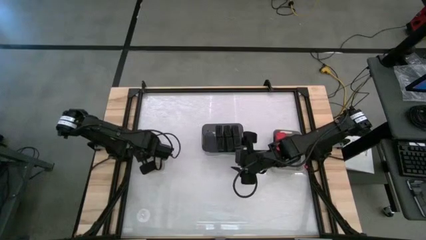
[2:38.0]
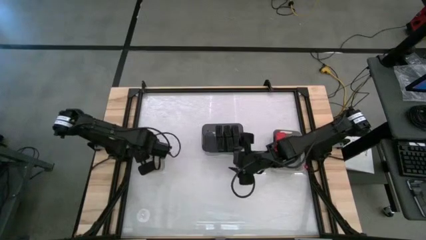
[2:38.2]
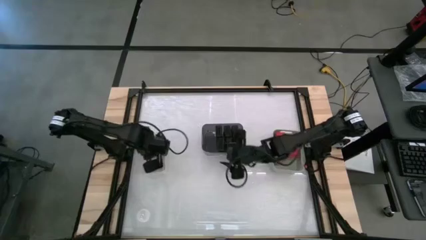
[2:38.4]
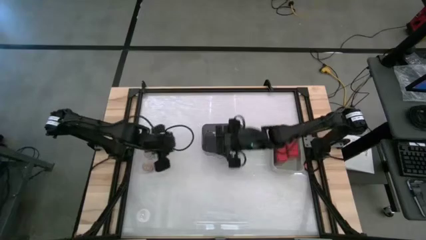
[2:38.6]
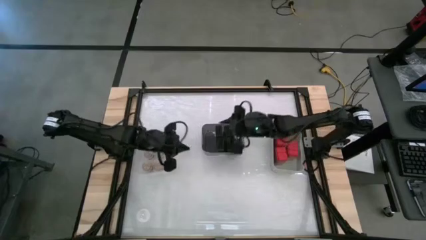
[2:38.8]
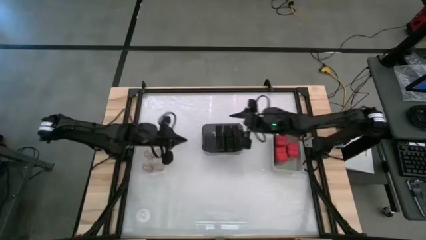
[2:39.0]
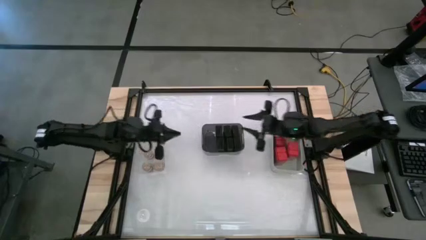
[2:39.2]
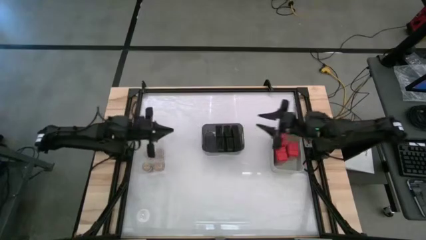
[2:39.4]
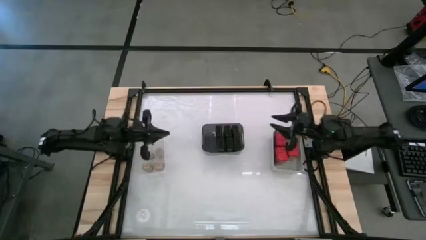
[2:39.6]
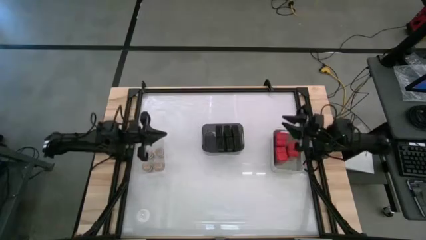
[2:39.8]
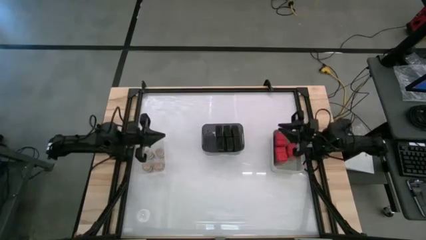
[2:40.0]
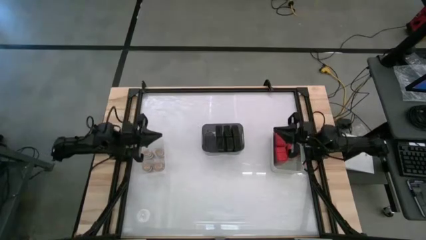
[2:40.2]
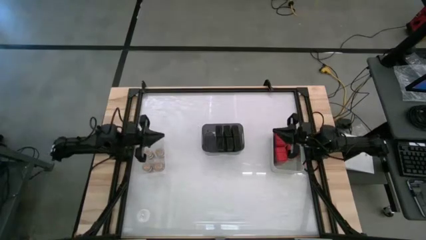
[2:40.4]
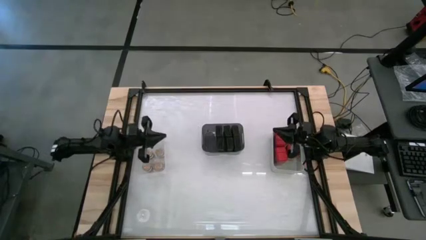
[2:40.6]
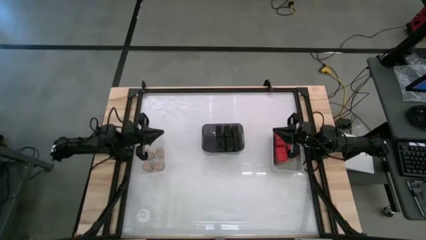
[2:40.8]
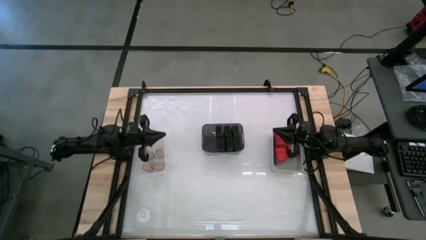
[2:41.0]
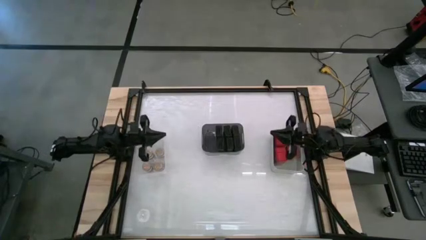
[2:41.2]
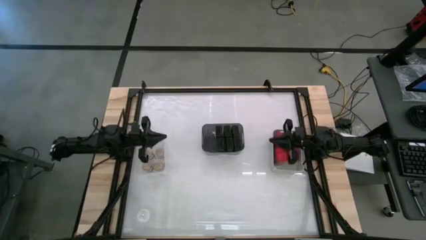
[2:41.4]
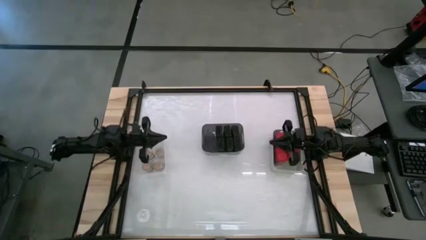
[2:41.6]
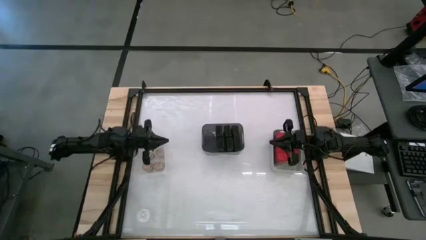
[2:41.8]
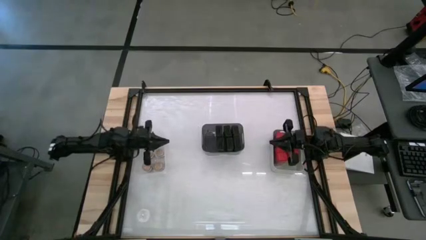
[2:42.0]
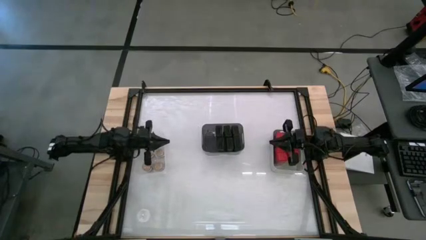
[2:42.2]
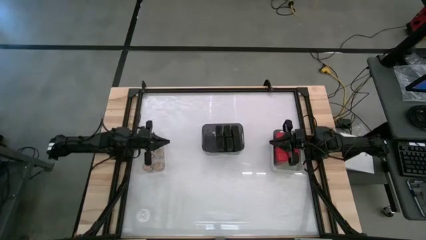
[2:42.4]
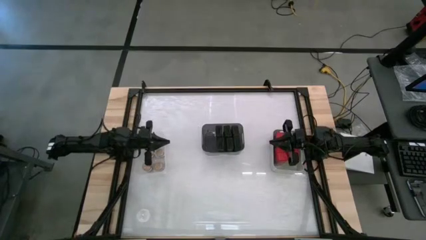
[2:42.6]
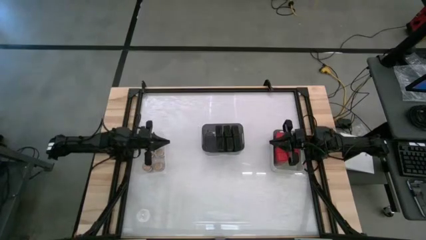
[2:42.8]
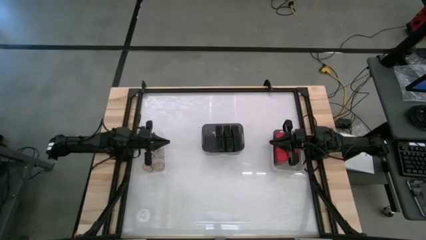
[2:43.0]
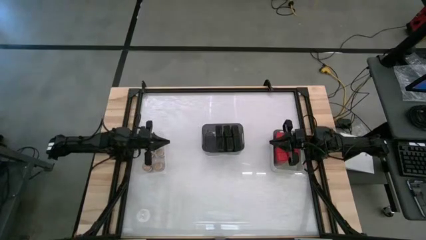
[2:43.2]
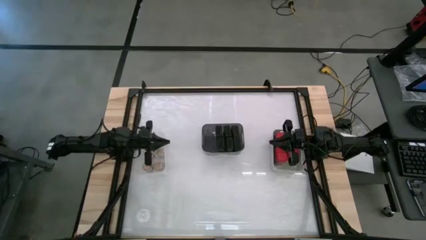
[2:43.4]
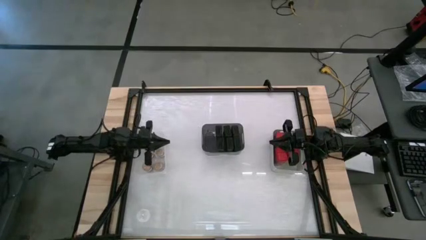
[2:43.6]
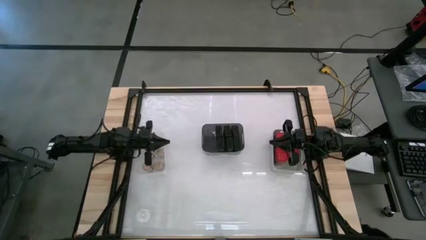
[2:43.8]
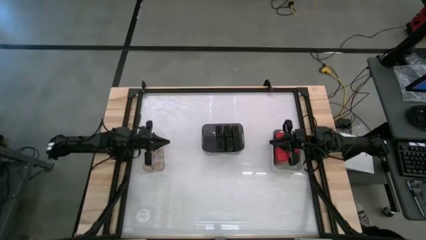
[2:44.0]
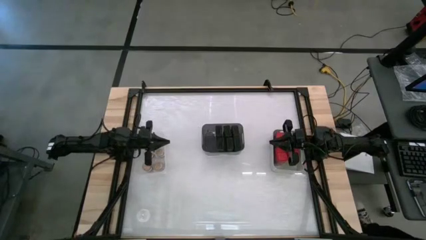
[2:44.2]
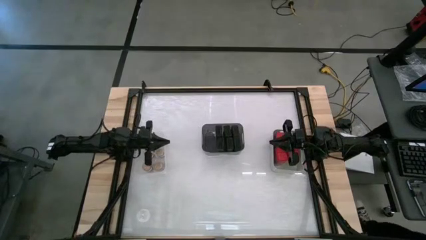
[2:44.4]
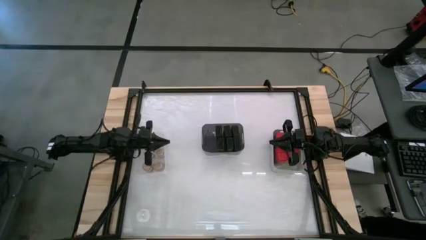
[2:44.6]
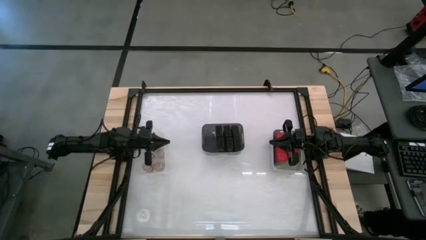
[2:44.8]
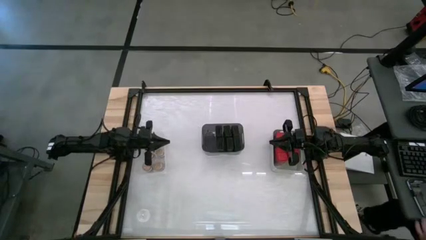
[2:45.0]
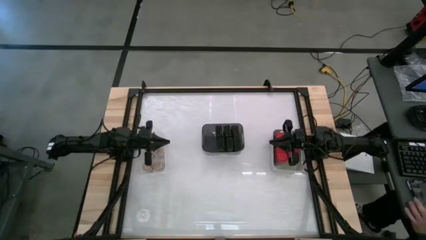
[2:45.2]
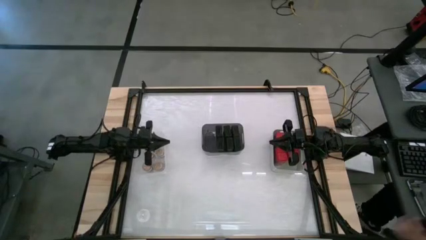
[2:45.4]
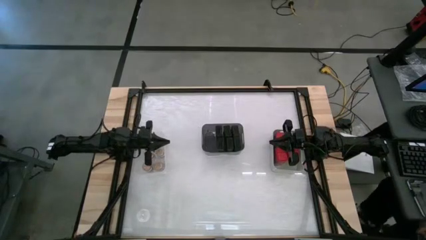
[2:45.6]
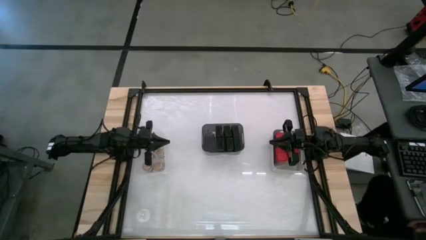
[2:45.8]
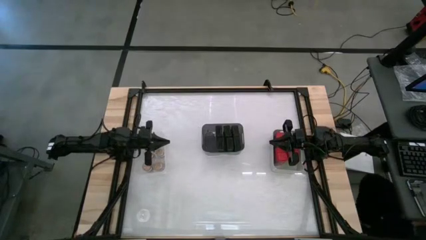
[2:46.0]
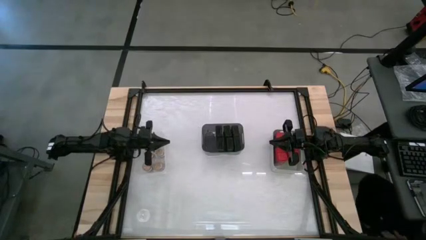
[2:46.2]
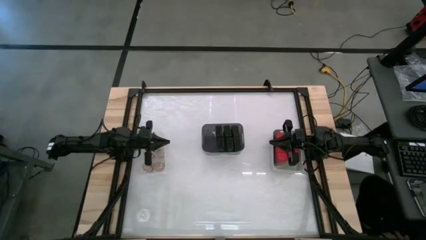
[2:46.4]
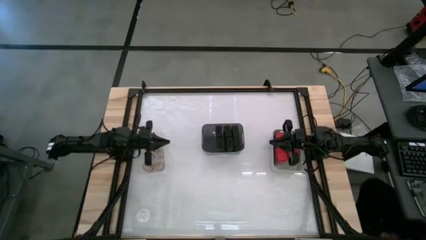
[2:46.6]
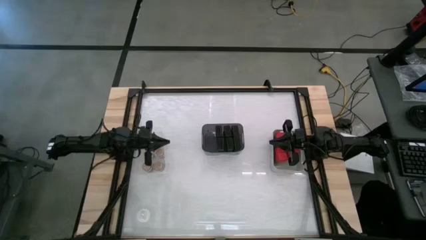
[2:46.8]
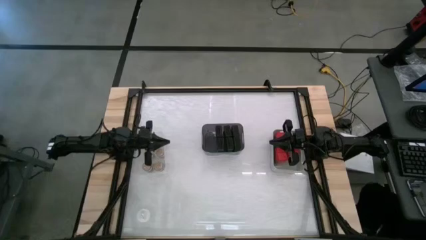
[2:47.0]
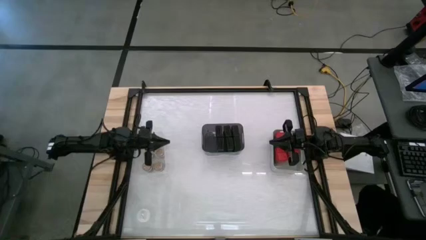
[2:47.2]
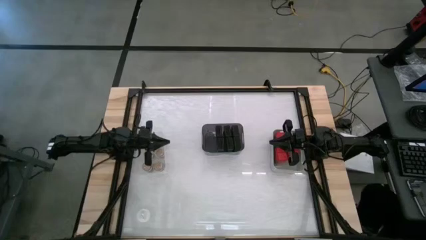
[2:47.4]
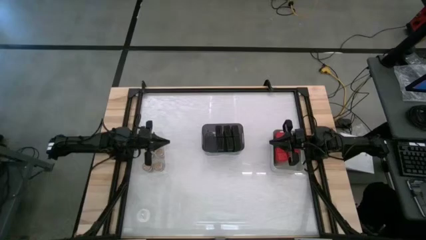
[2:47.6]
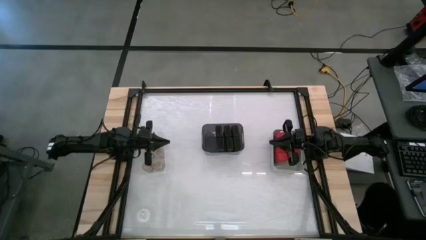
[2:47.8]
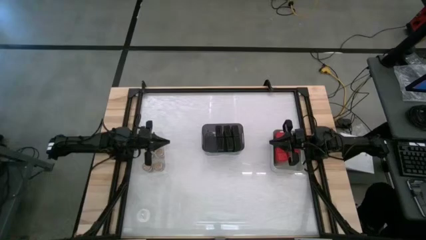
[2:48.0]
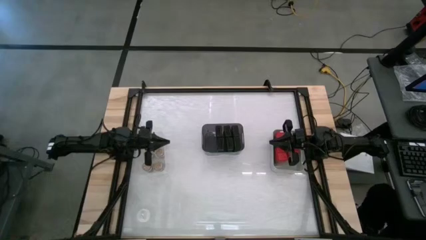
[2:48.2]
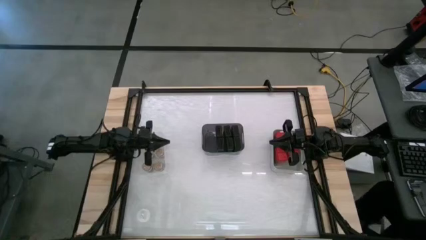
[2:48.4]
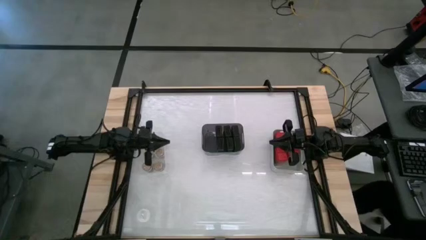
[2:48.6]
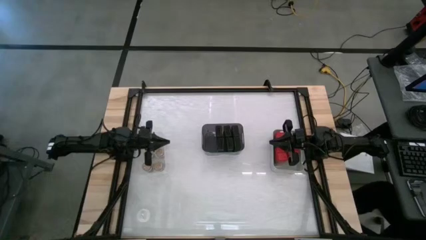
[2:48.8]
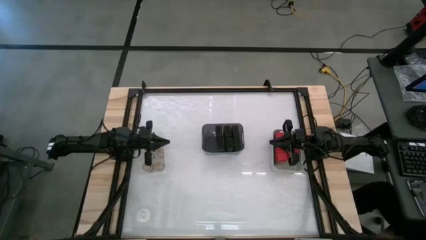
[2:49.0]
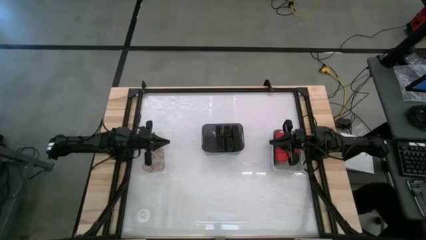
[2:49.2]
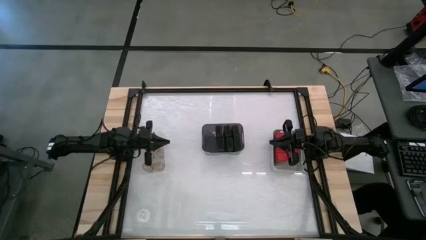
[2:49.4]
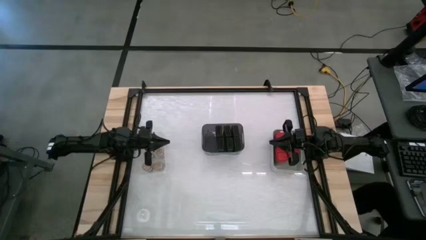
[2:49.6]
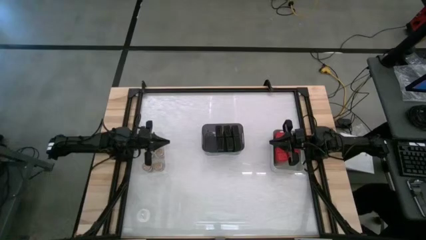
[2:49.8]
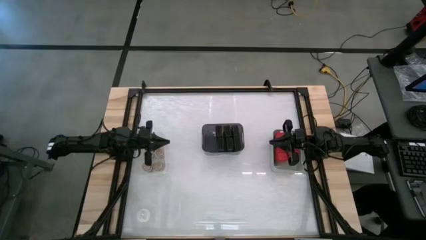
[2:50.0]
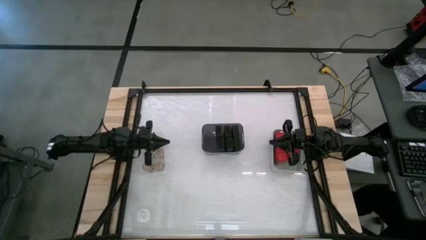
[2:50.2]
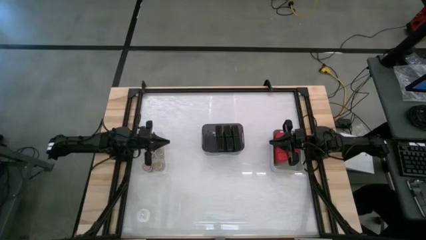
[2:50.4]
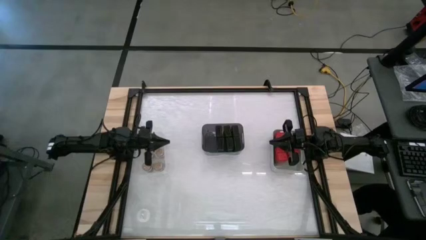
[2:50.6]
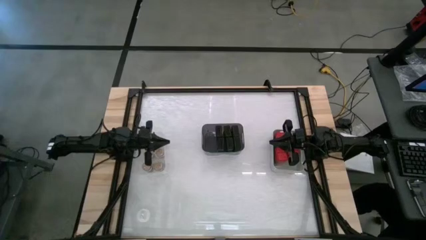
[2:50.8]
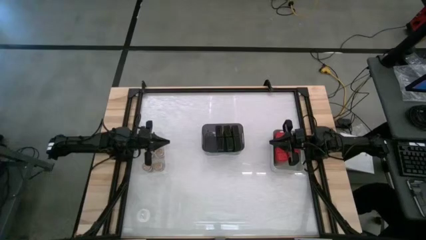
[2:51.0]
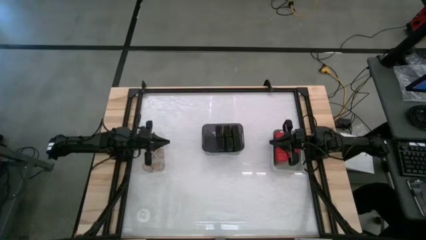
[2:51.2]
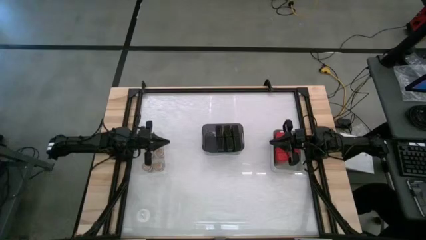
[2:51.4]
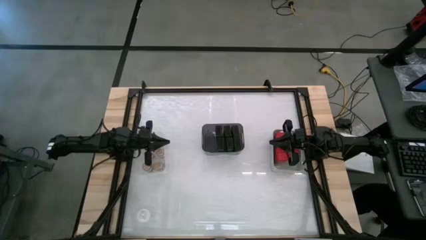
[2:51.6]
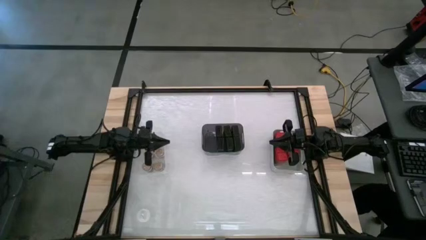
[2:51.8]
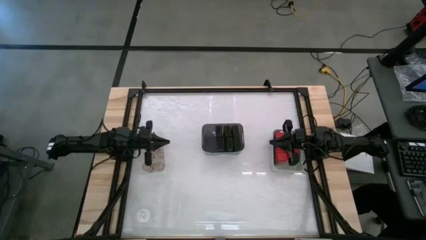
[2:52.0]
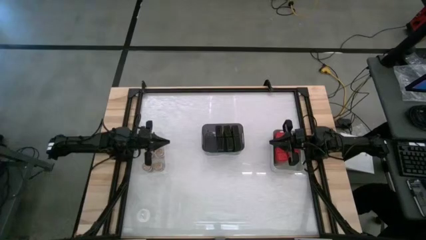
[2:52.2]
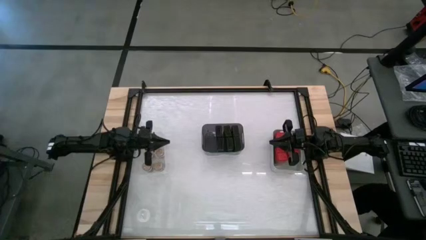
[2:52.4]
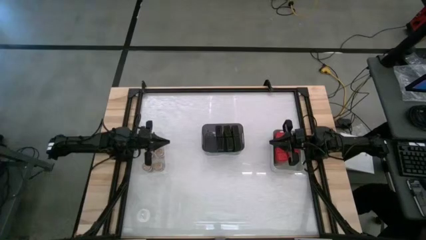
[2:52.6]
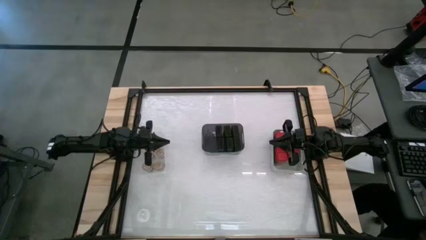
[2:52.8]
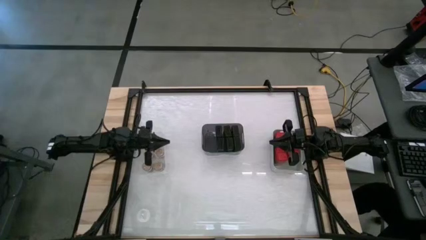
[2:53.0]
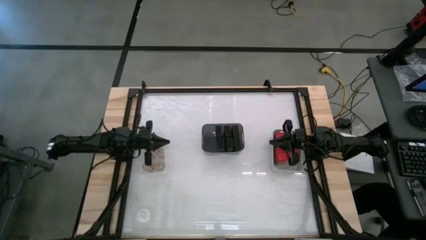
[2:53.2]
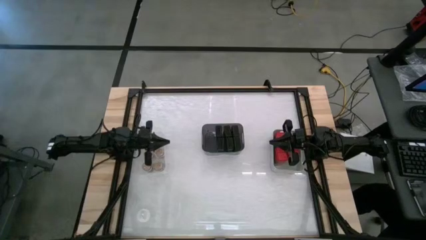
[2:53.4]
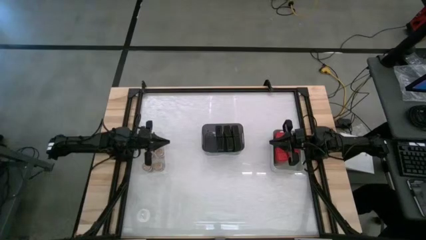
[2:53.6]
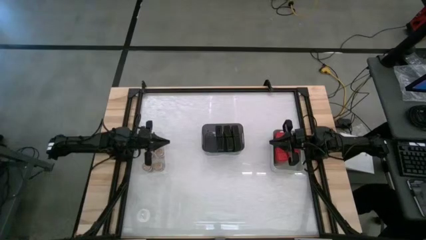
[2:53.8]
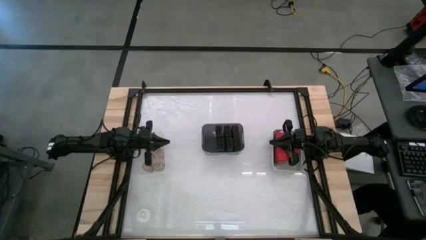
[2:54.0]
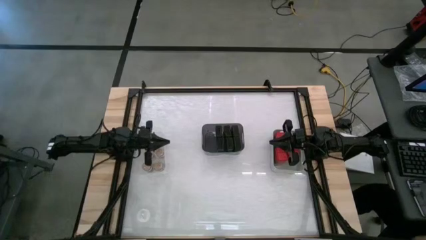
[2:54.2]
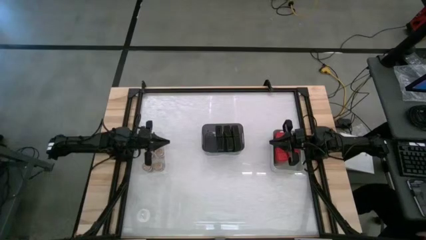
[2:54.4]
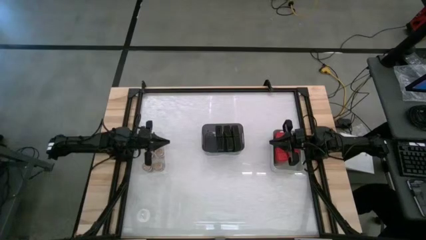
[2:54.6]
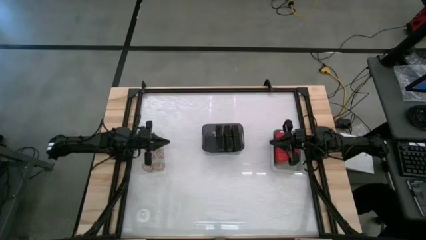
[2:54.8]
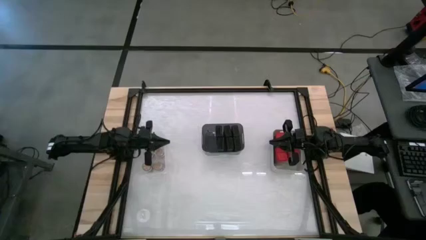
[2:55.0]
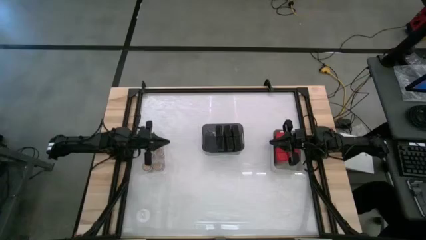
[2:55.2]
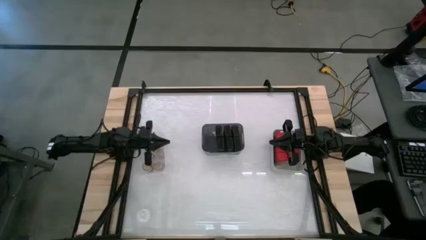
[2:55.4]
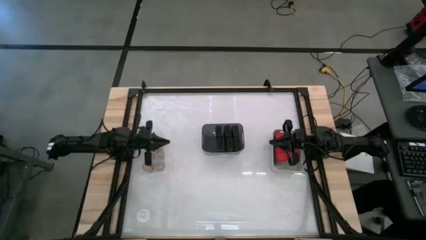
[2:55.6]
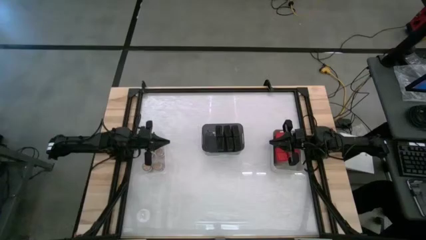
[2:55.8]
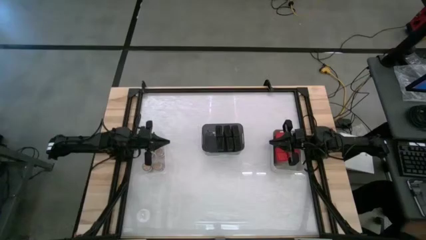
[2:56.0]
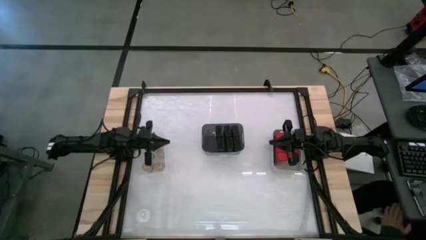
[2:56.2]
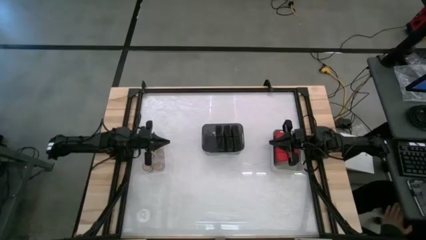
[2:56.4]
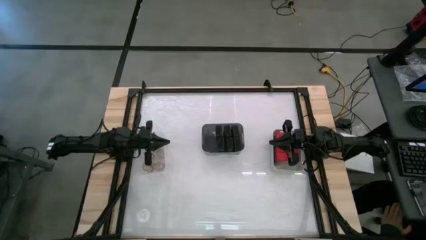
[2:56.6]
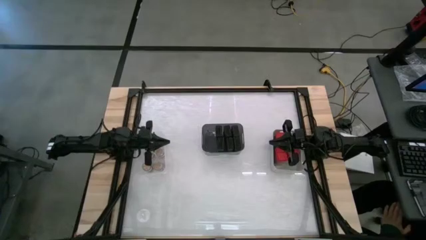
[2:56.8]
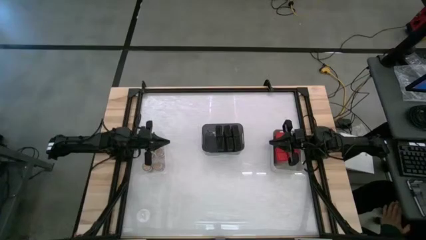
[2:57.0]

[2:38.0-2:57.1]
Task: Sort spices by type
Return to Home Position
